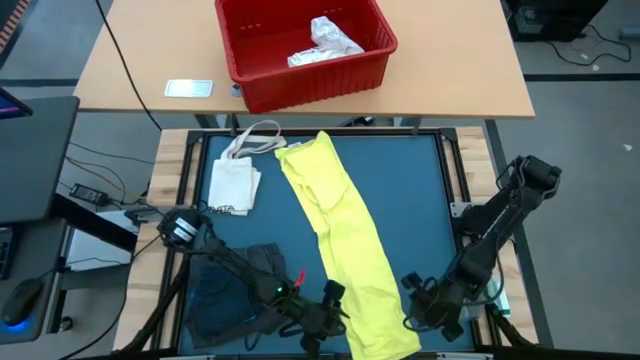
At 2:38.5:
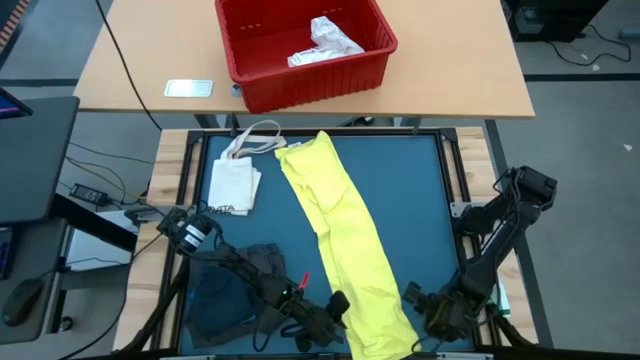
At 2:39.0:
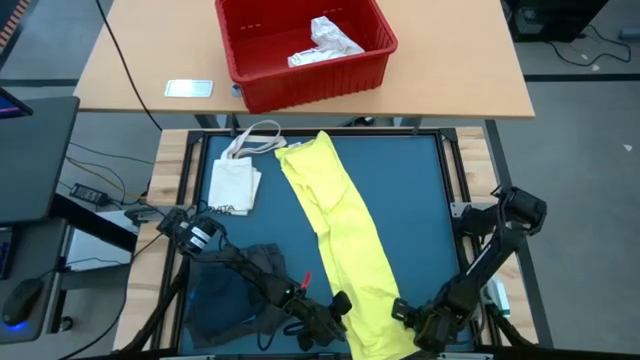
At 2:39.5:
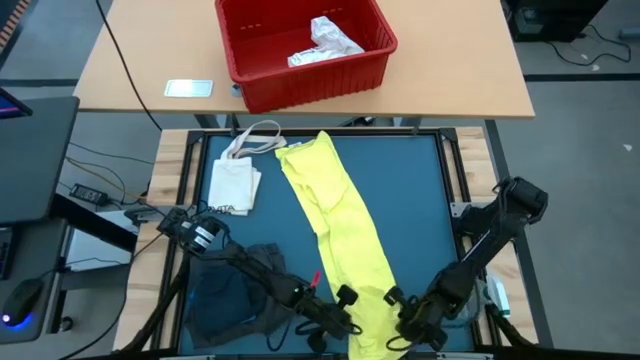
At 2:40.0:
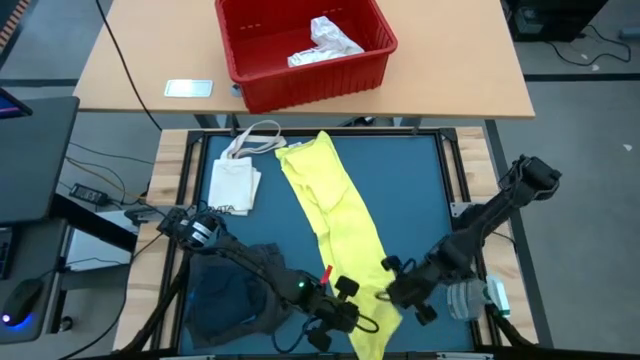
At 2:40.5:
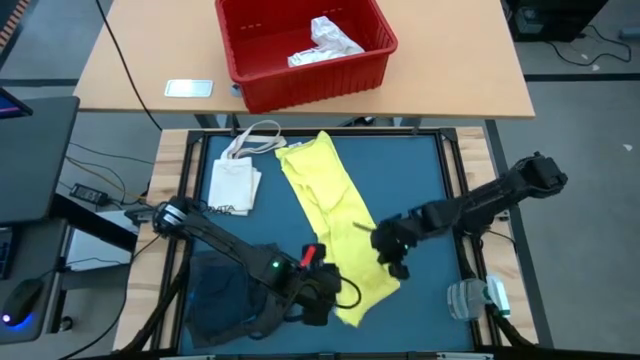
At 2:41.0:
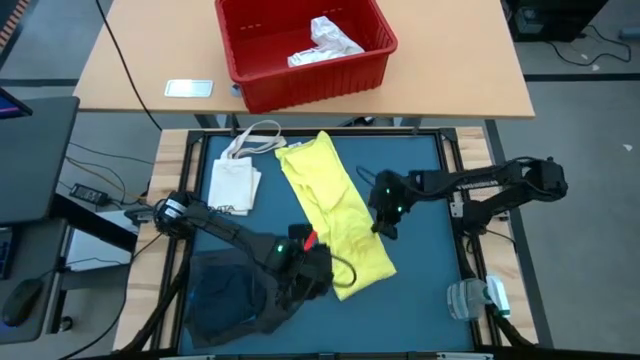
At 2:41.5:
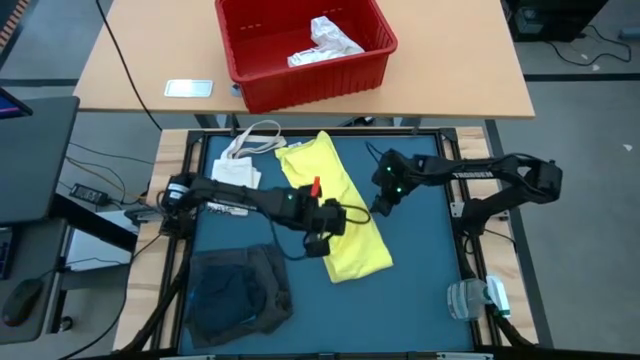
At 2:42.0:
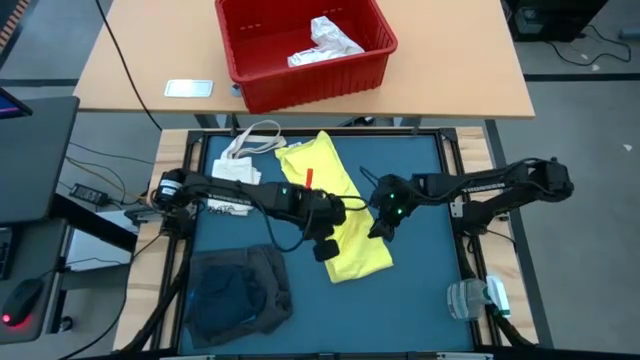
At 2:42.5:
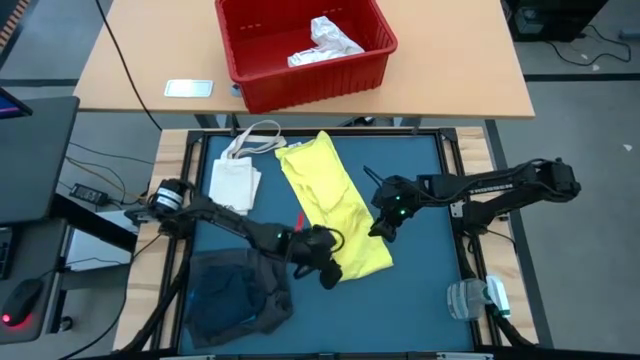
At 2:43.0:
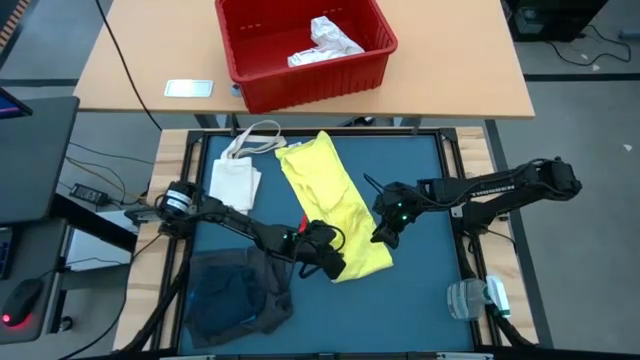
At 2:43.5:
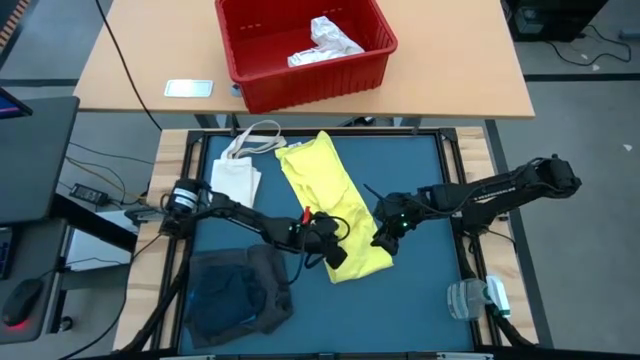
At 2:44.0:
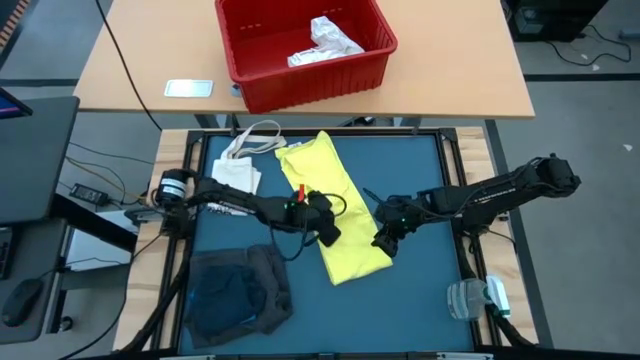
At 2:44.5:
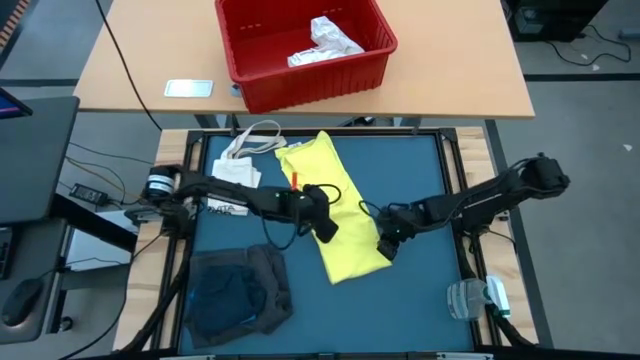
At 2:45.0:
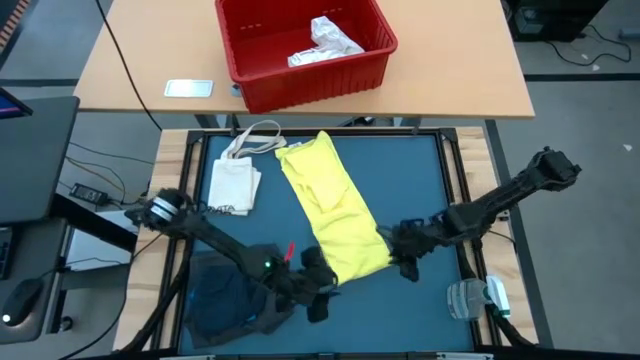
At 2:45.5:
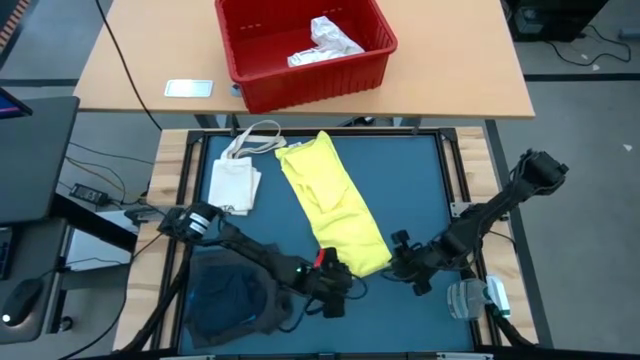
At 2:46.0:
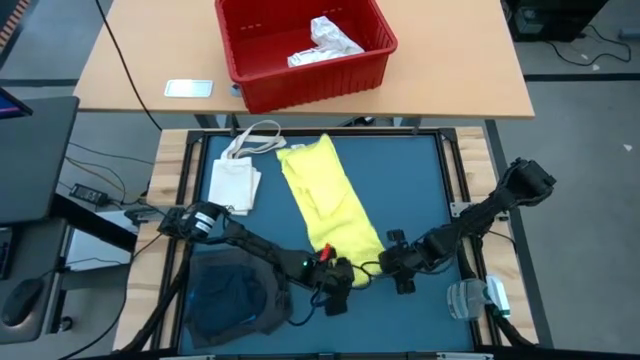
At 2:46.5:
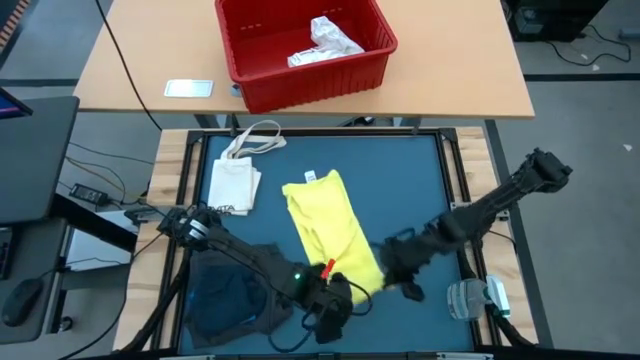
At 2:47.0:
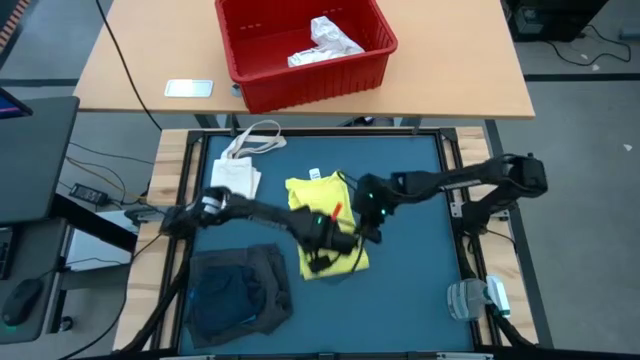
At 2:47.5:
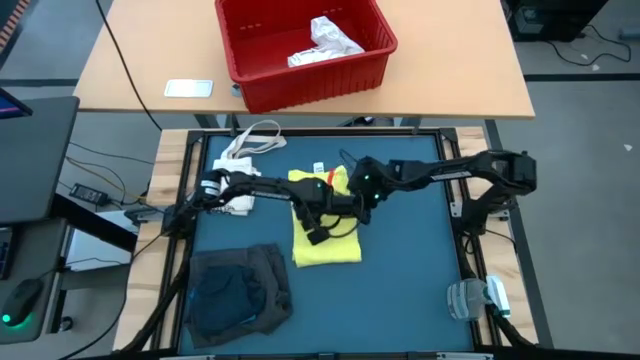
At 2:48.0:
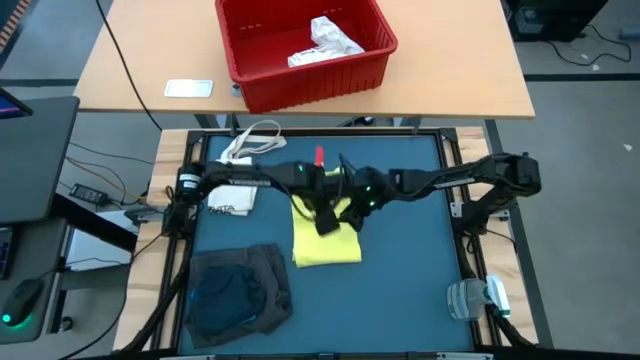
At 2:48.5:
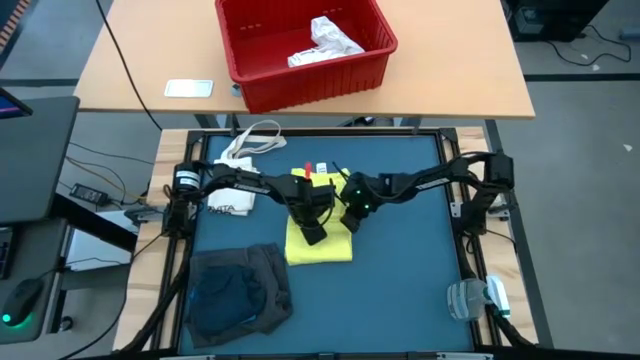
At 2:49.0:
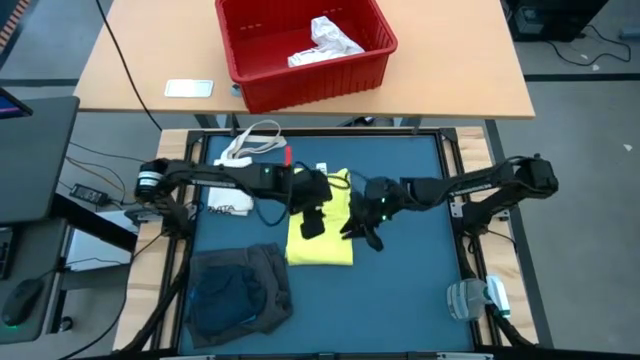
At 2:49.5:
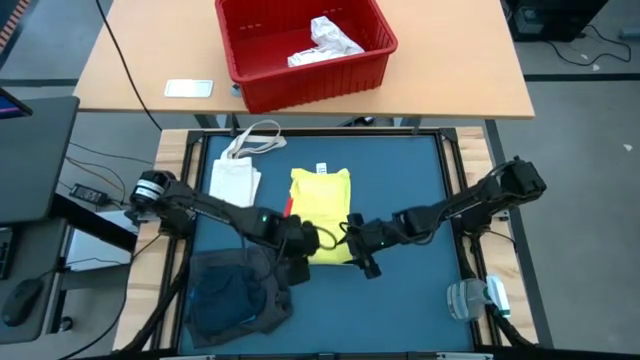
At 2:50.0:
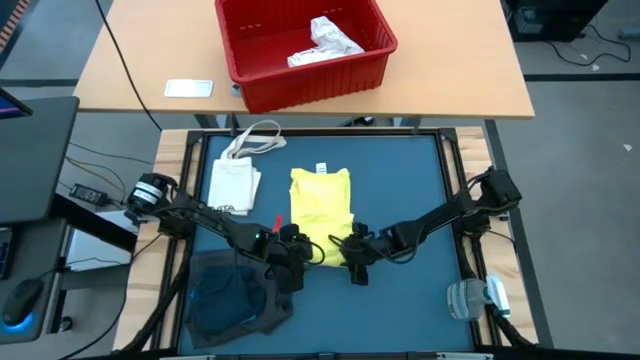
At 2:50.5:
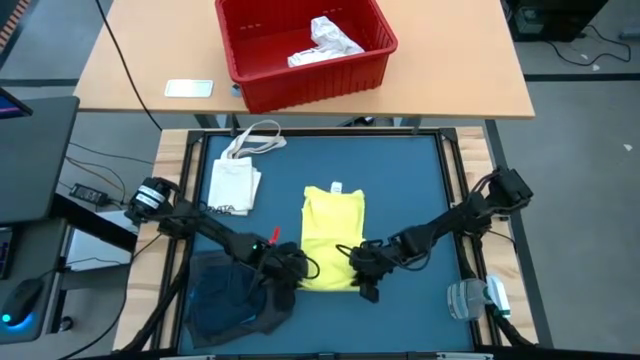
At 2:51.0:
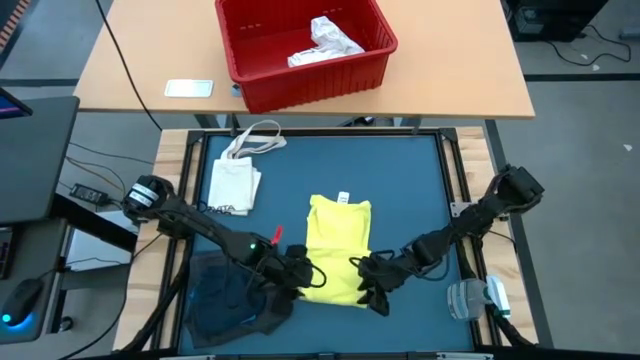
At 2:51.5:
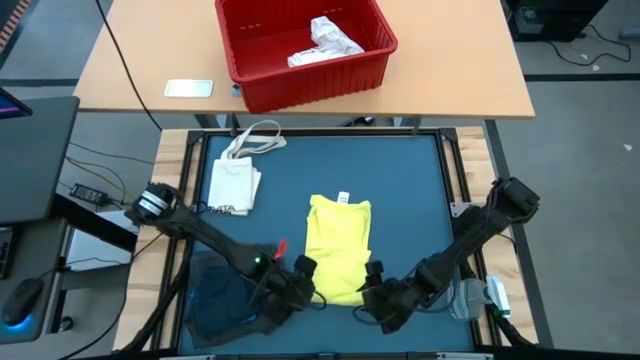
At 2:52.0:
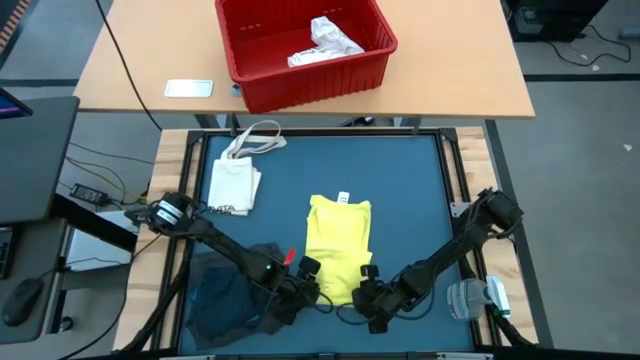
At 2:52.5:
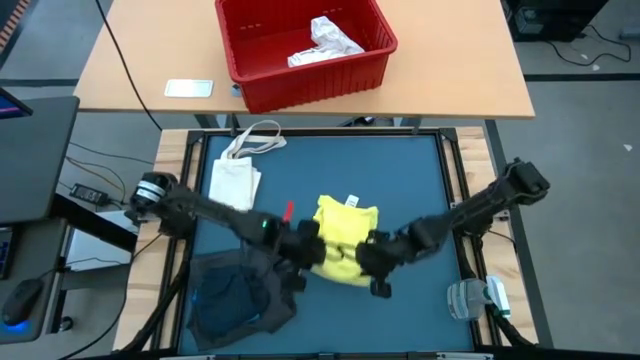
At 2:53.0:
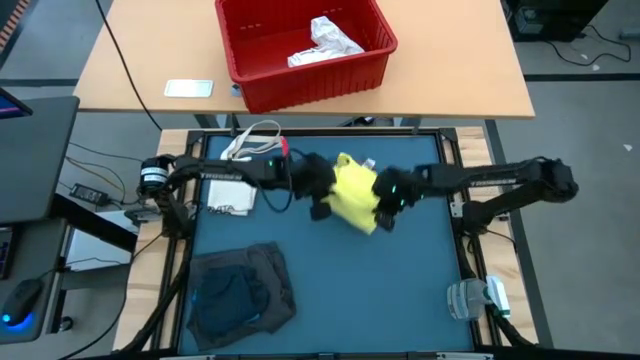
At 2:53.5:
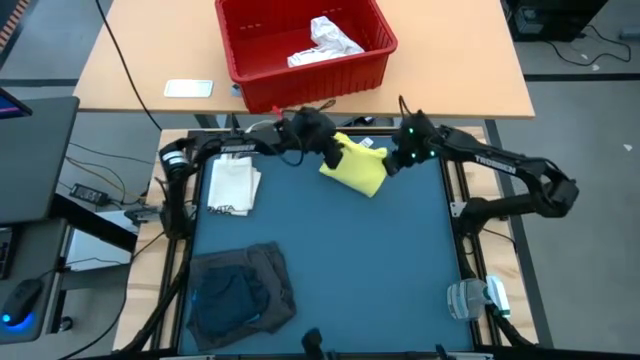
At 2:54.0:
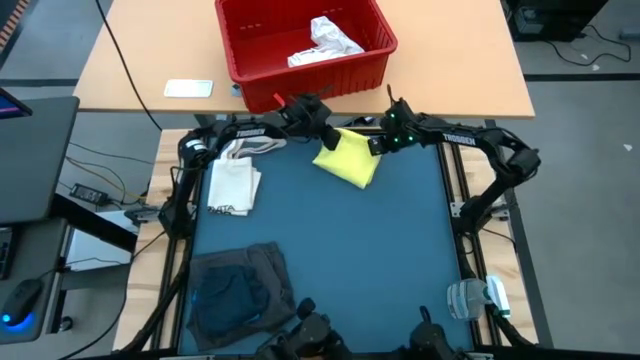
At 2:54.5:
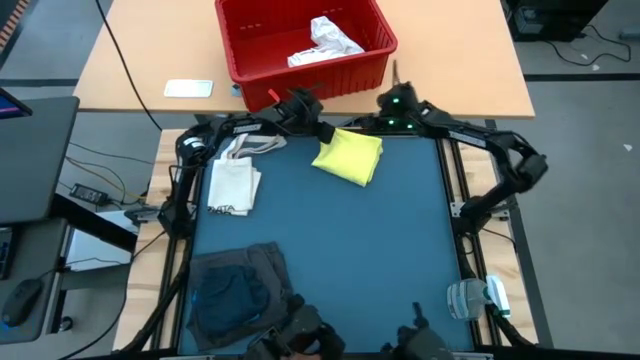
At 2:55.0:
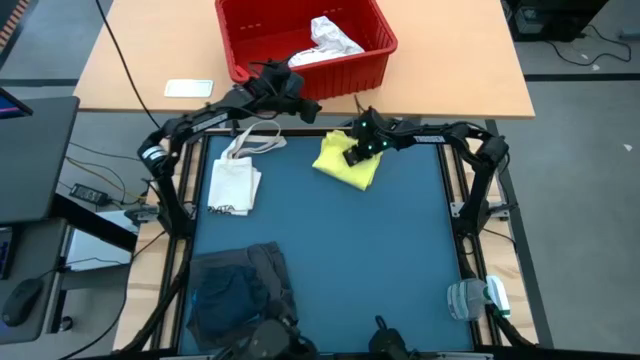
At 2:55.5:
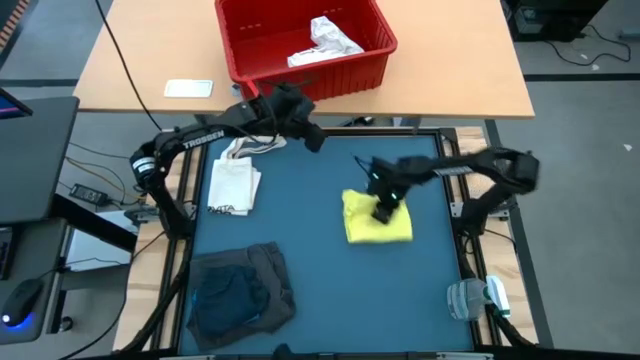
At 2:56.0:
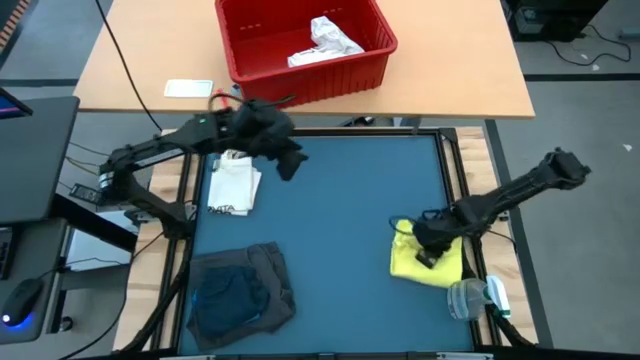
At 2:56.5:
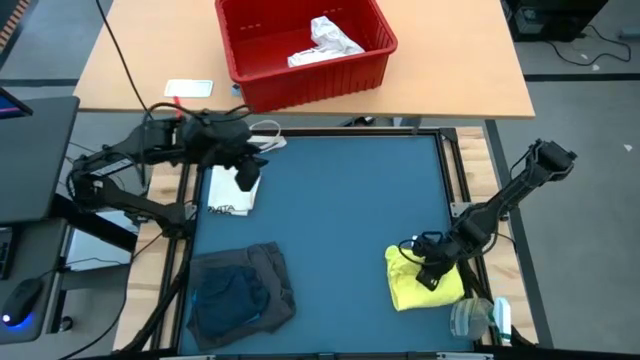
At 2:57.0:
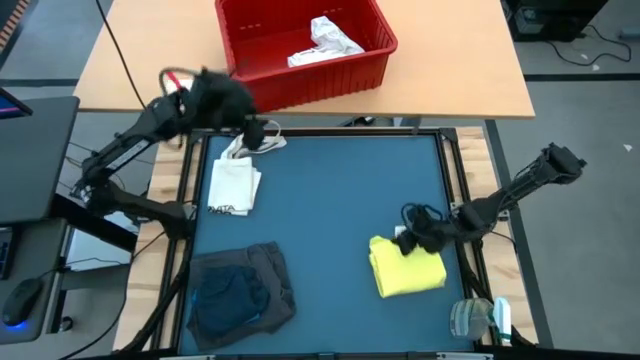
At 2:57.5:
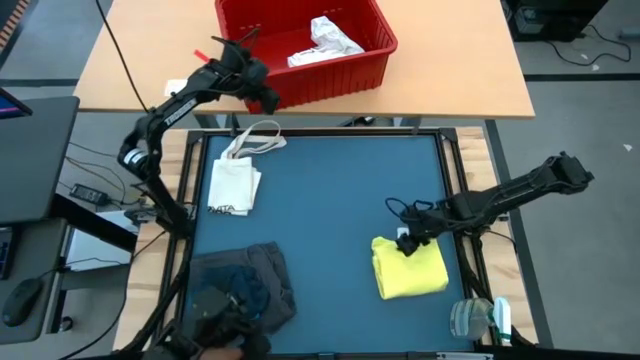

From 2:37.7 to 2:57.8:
Task: Fold laundry
Fold the yellow shirt
